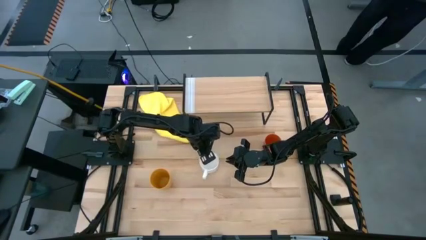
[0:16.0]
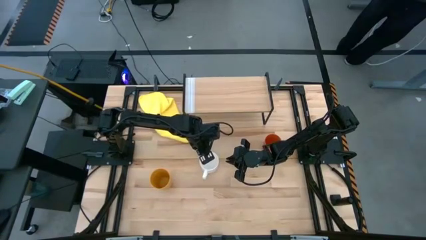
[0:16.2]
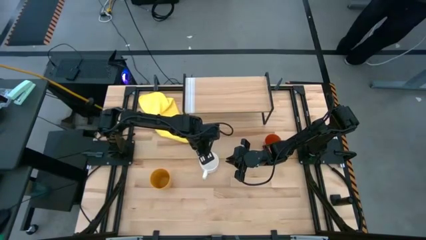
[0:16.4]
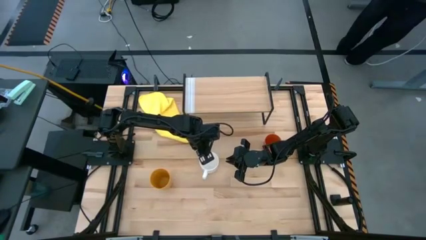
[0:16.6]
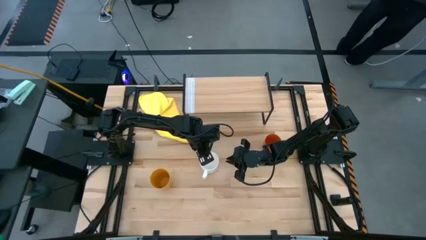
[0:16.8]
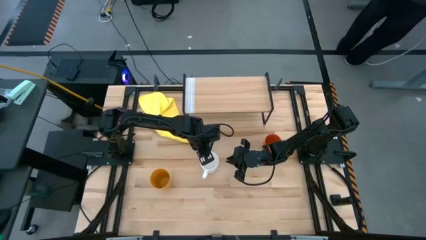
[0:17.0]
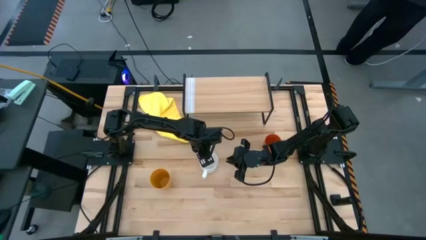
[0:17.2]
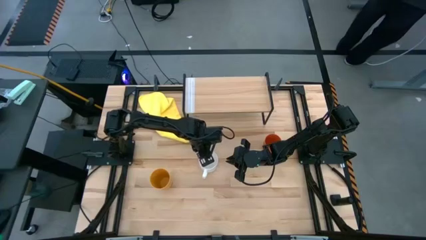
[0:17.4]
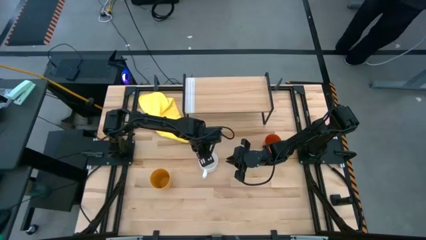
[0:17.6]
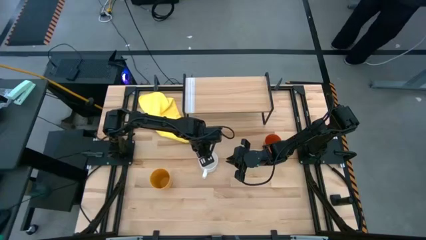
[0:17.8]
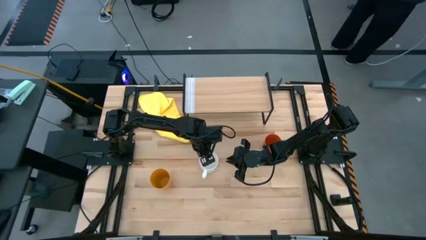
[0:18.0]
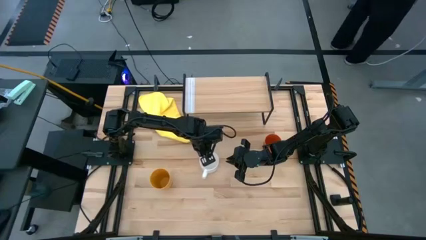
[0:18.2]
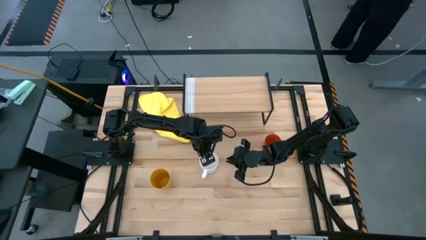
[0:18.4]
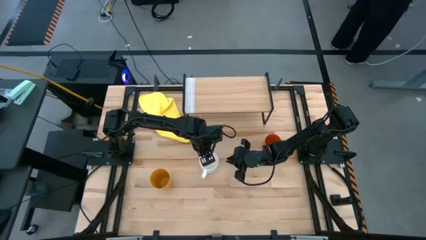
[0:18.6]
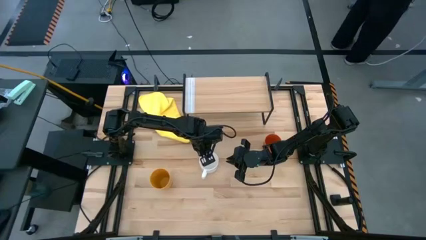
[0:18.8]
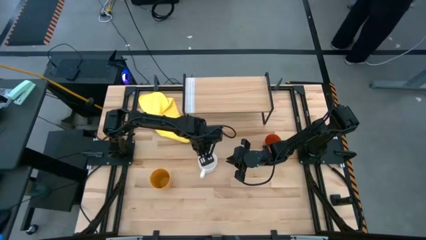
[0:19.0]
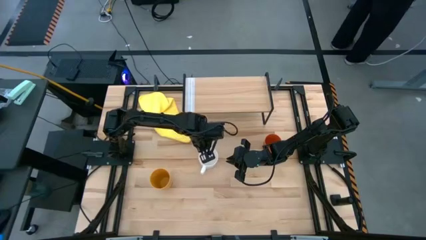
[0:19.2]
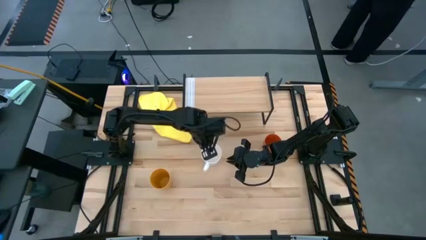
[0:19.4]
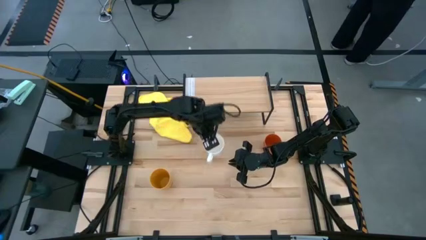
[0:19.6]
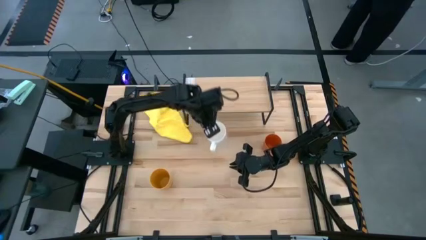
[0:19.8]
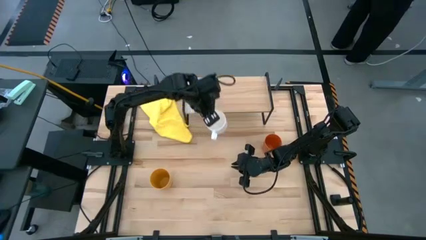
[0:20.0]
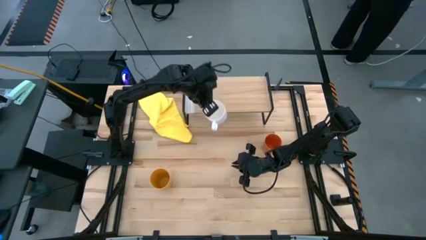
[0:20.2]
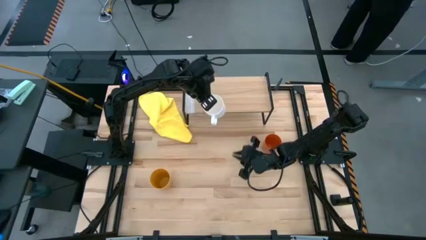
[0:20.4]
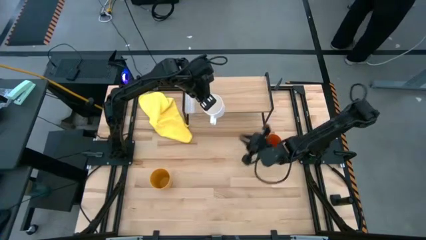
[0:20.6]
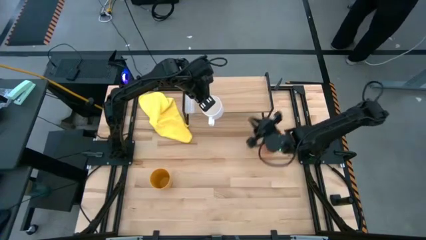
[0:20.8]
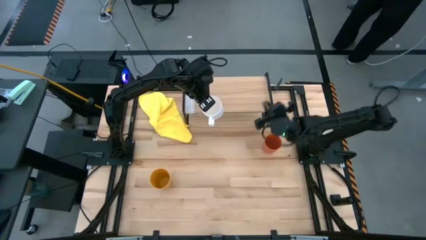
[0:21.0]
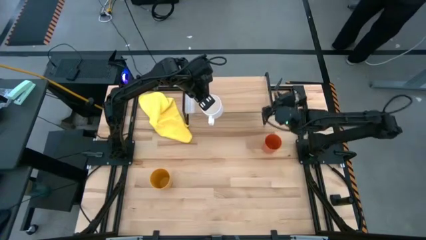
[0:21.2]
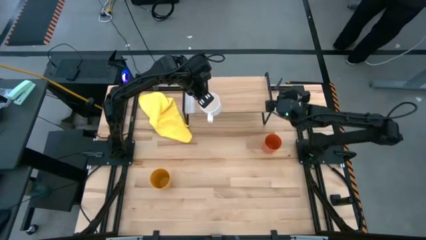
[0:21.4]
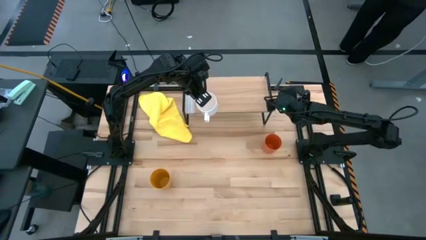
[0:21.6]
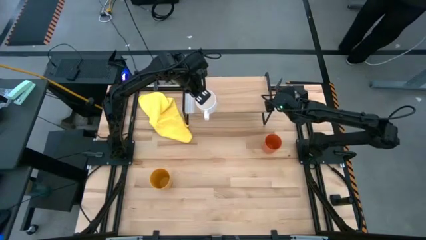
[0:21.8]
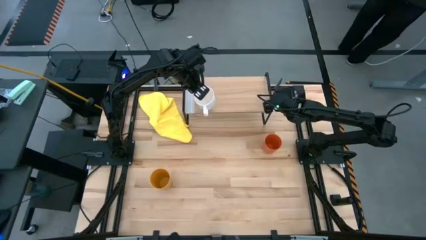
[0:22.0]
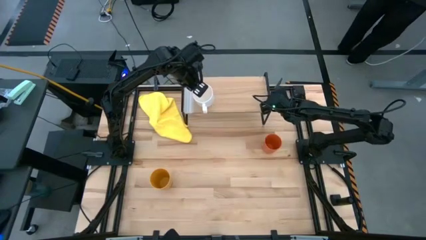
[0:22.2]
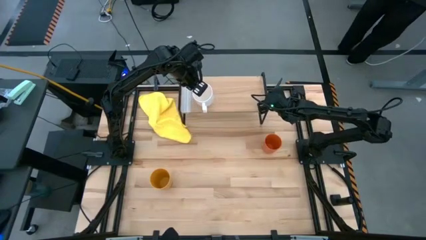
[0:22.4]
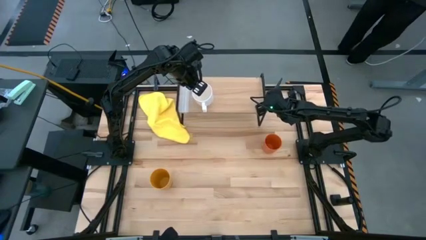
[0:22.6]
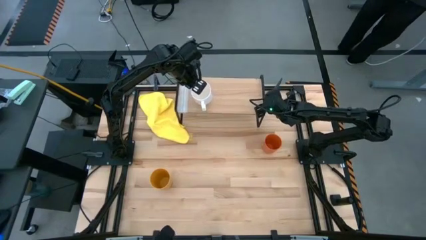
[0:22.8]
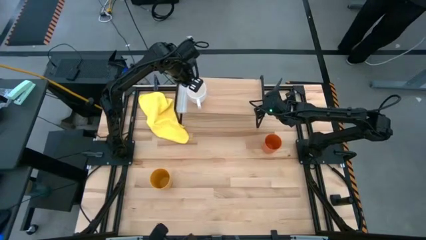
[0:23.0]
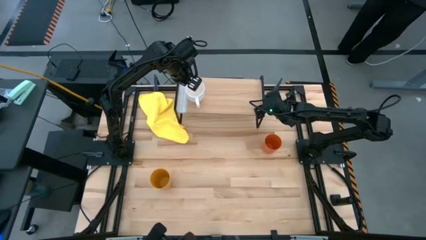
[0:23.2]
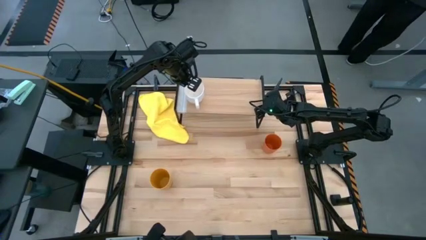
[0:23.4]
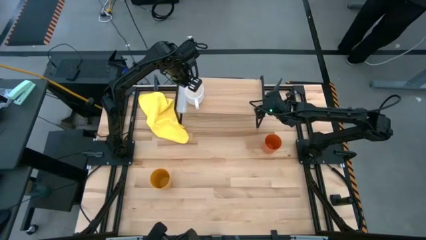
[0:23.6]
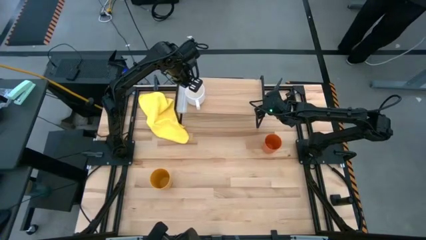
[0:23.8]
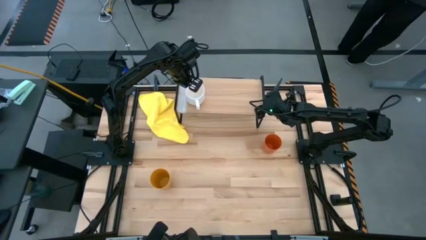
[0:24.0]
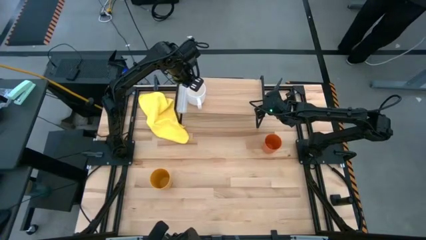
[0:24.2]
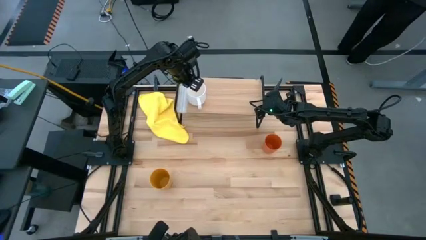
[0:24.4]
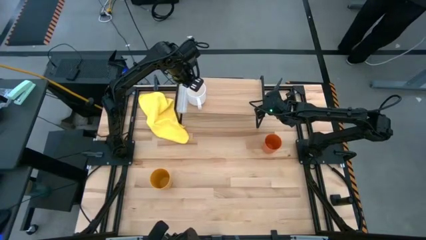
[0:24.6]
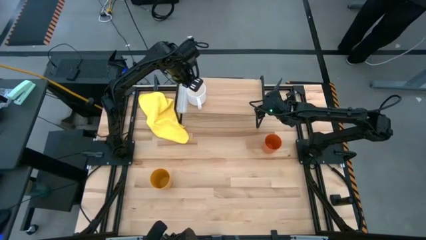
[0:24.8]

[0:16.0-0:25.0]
Task: Stack small to large cups/mugs on shelf
Put the white mug on the shelf

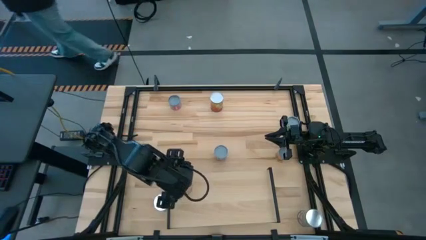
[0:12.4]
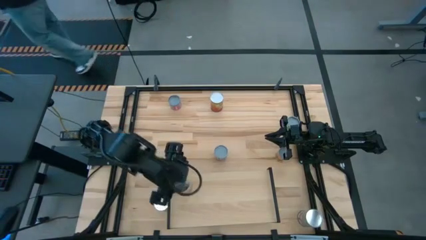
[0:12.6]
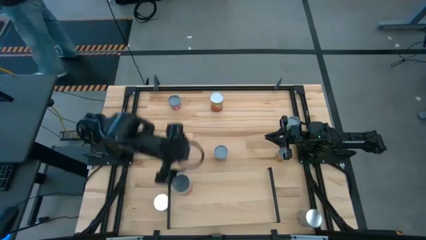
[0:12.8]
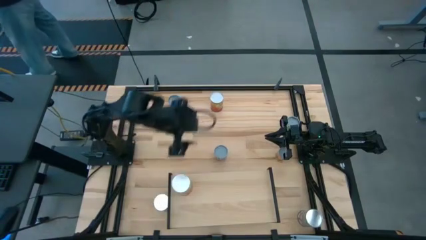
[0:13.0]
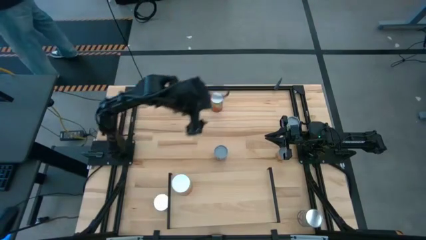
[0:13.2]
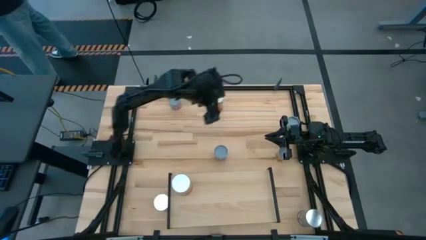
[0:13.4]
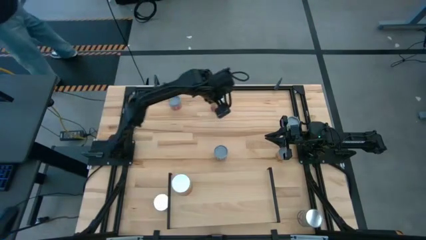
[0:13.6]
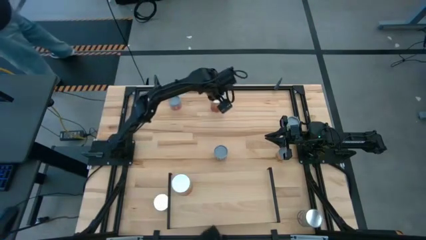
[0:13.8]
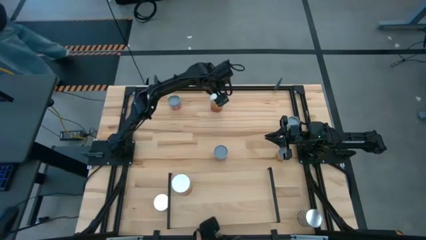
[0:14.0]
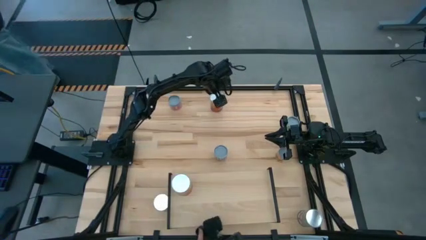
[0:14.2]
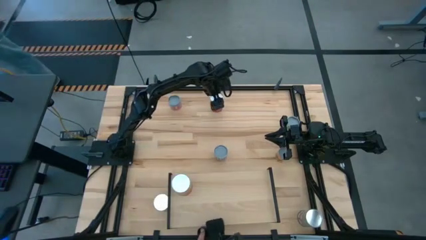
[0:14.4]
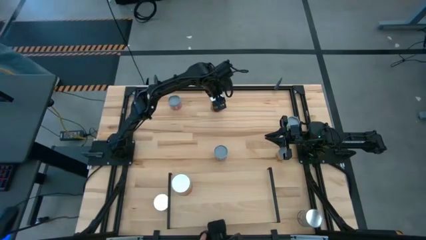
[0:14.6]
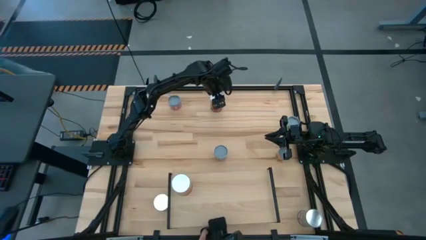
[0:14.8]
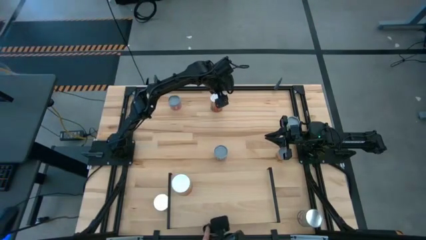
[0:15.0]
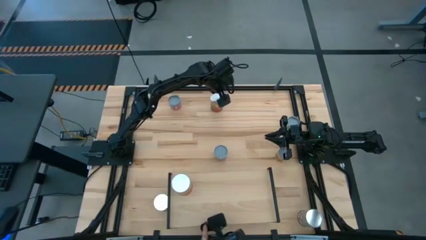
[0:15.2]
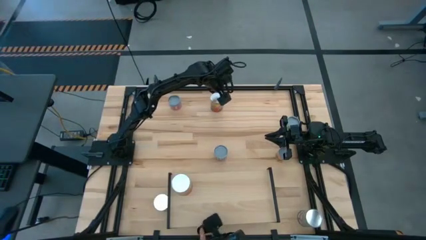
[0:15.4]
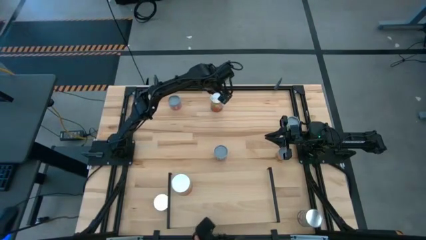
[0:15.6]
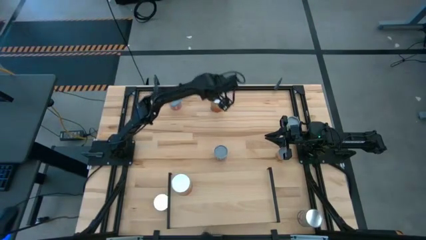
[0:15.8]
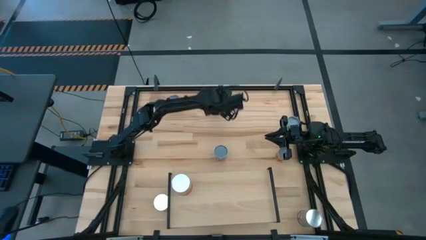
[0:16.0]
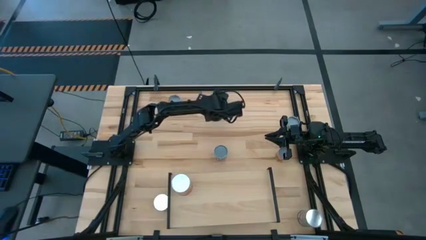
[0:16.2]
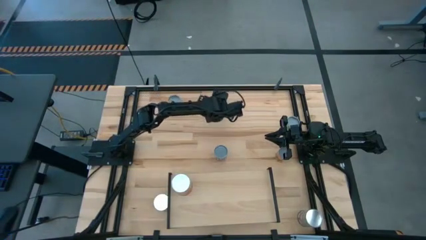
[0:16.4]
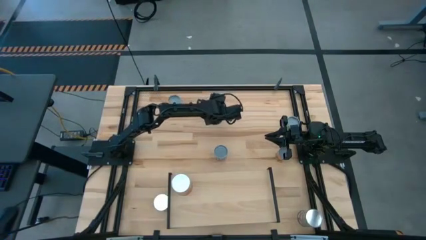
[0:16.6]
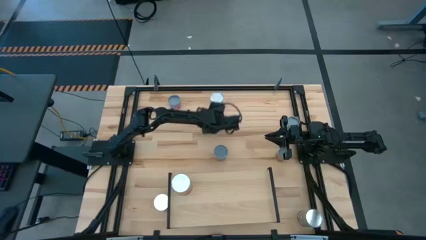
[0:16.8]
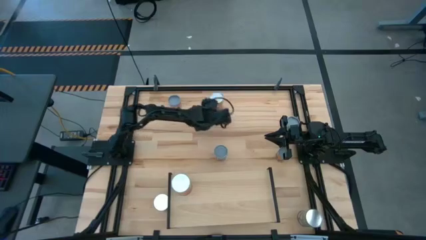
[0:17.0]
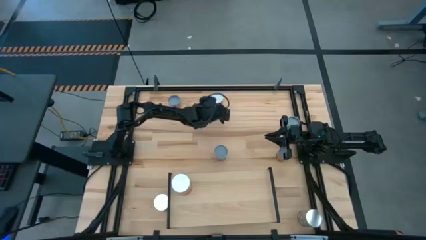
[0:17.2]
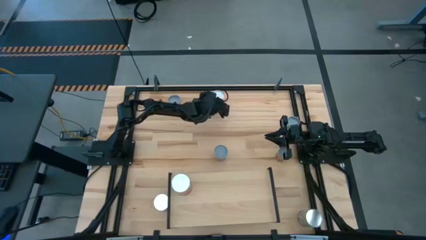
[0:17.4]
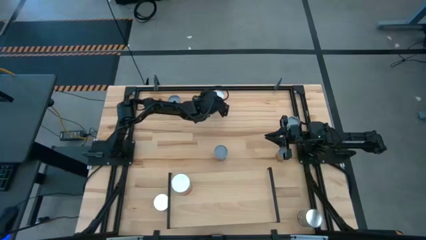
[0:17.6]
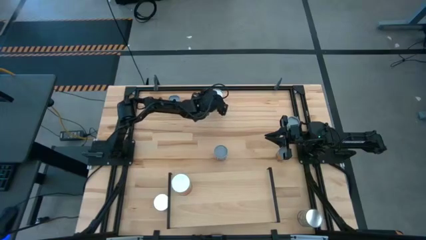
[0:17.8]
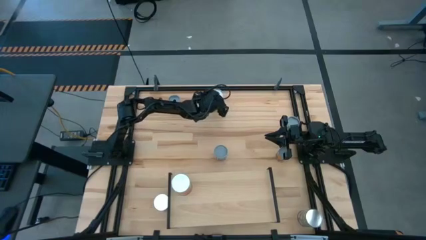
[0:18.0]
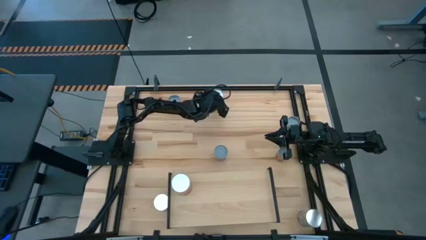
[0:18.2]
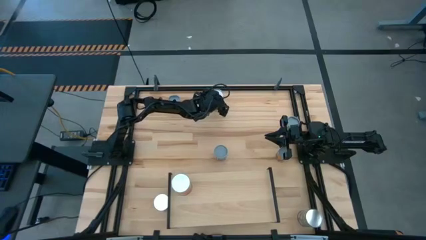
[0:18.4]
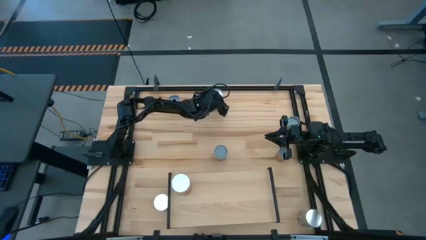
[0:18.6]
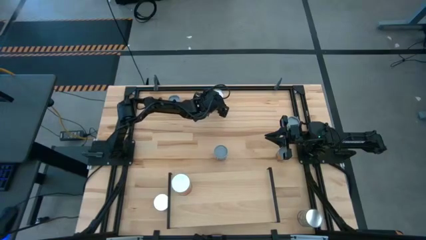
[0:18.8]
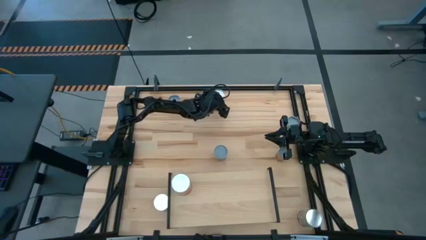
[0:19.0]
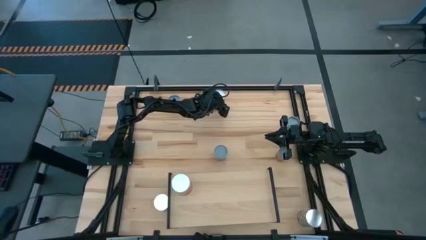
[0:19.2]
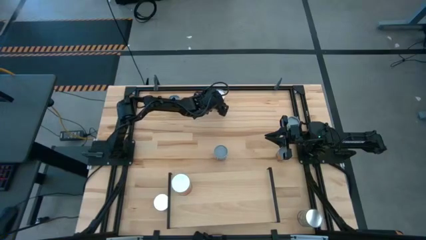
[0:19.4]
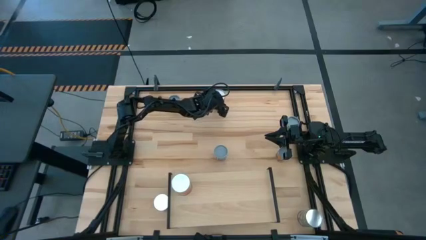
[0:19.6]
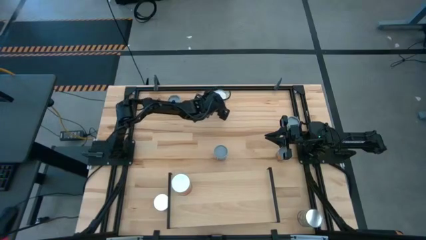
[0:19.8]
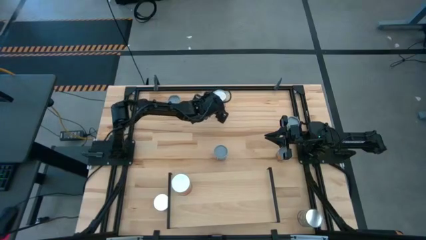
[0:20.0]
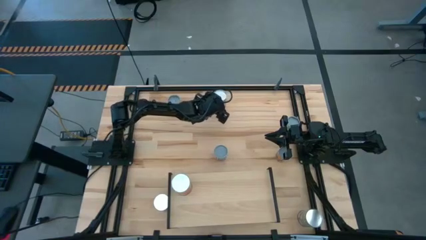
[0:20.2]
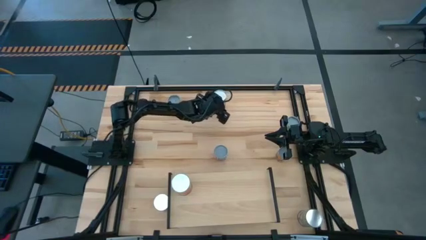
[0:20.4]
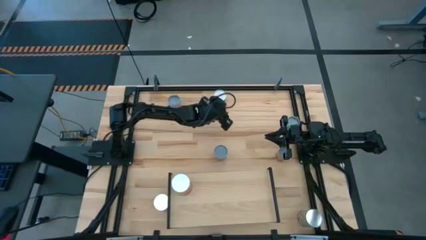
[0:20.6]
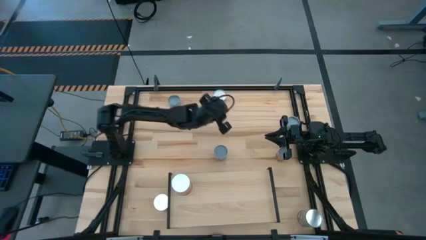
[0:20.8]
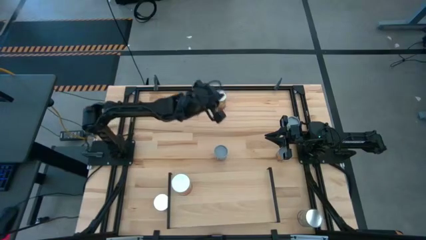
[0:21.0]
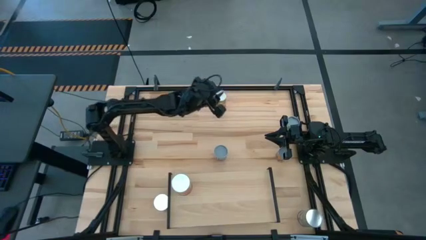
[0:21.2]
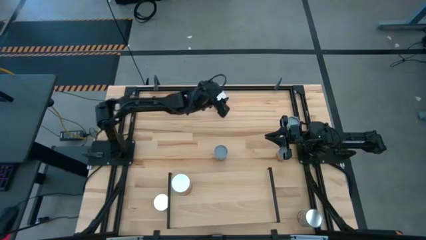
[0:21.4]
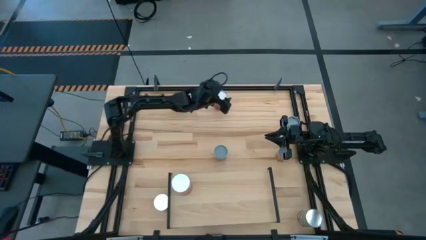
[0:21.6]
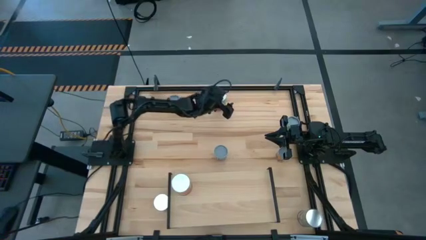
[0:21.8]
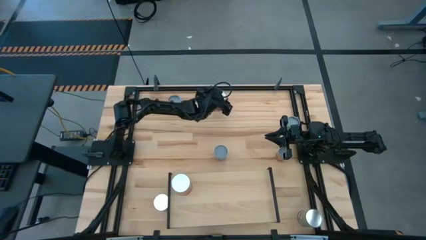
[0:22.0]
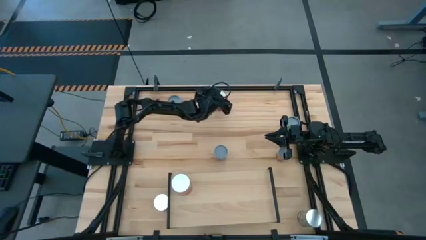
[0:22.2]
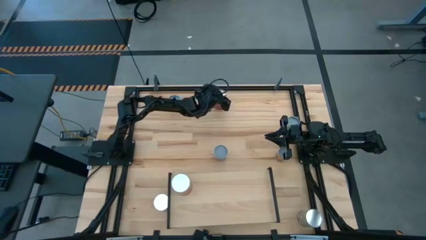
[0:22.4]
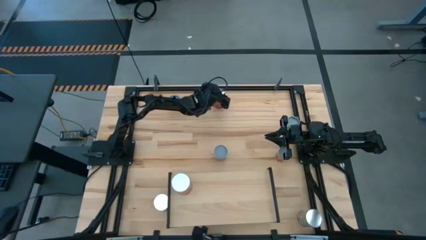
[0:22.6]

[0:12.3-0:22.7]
Task: Pick and place cans onto a shelf
Put the canned corn on the shelf aligned with the other canned corn
